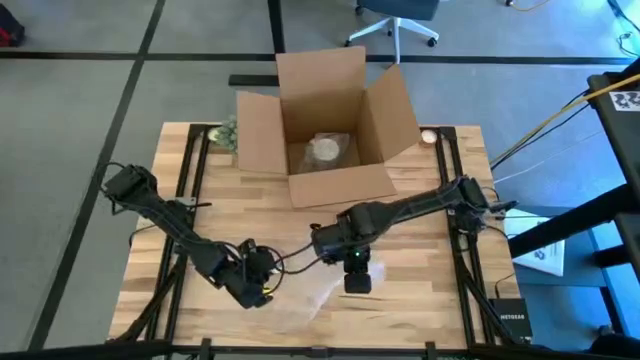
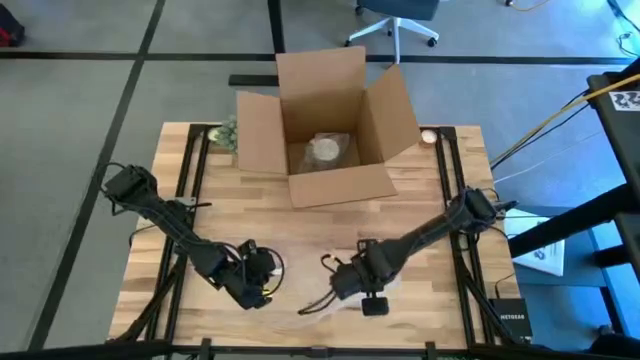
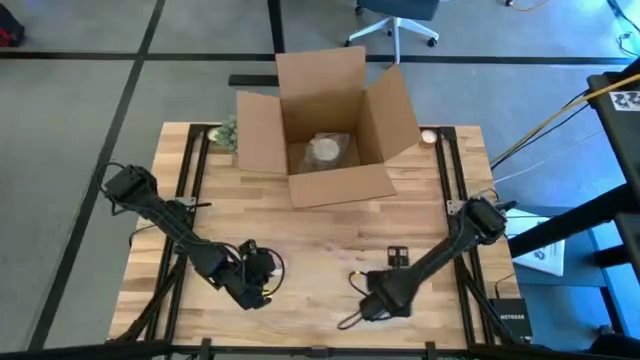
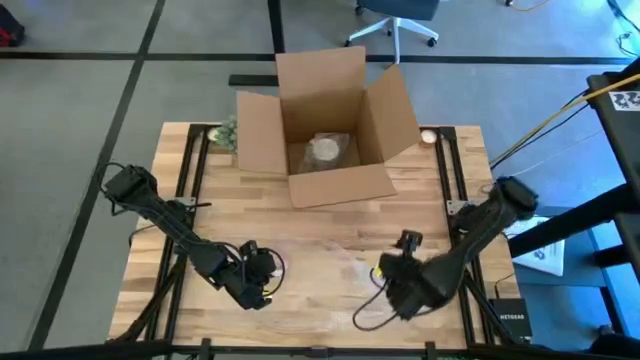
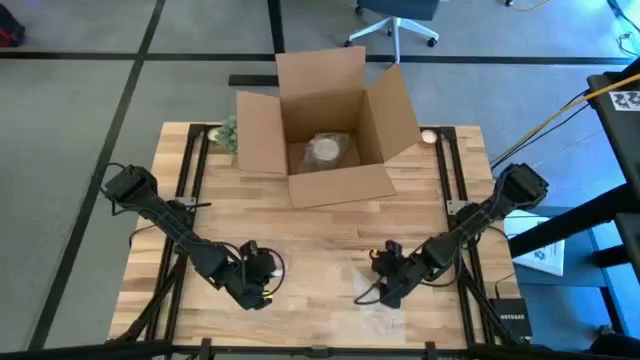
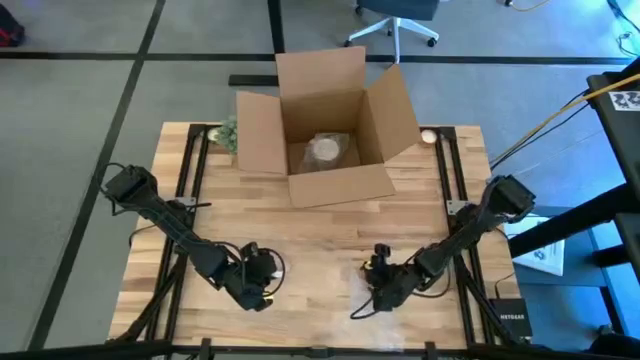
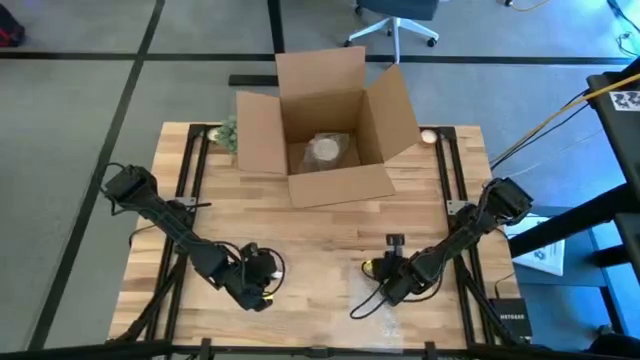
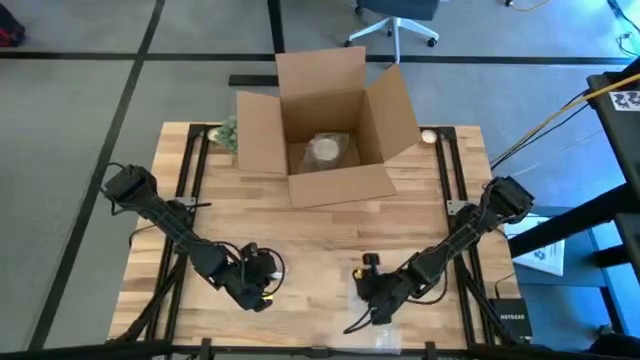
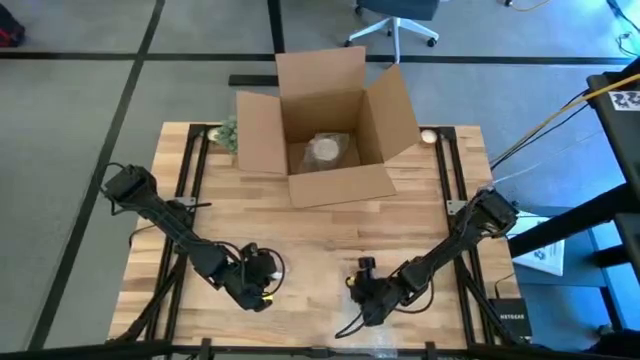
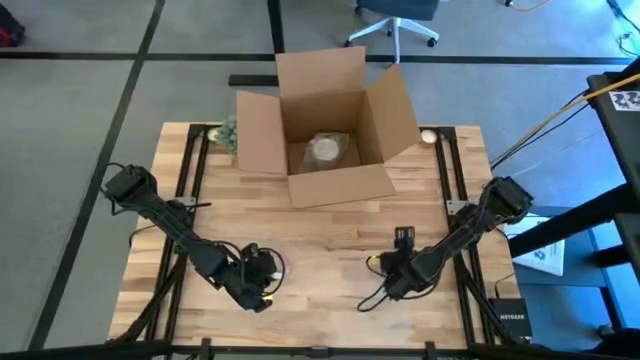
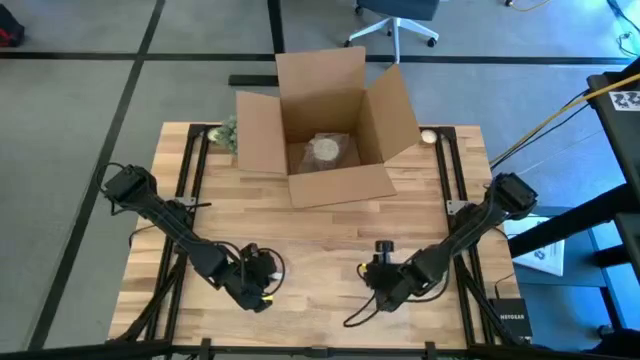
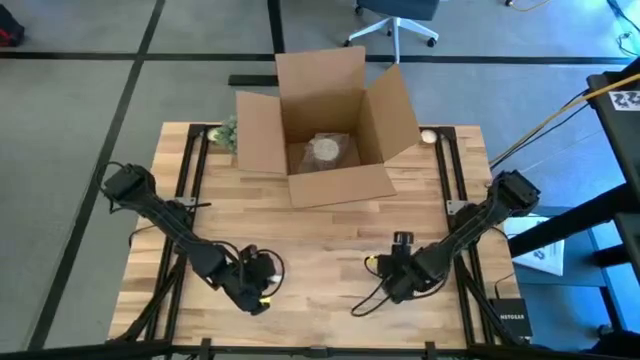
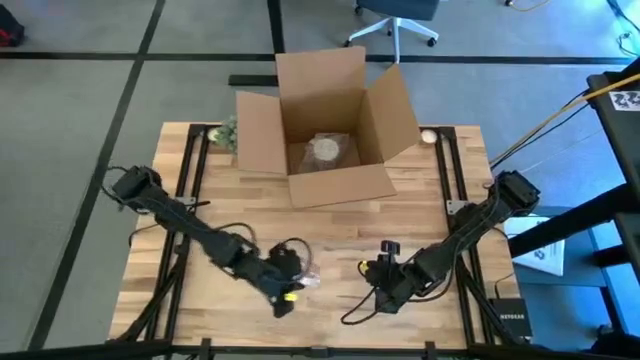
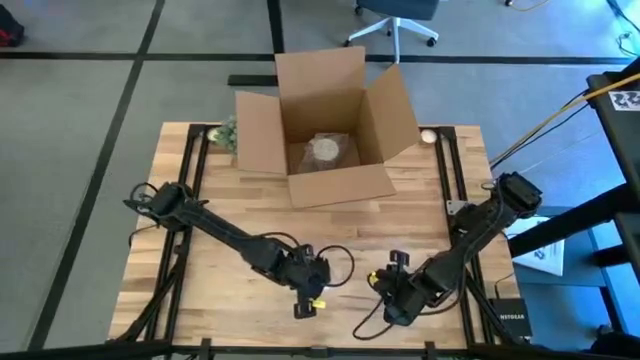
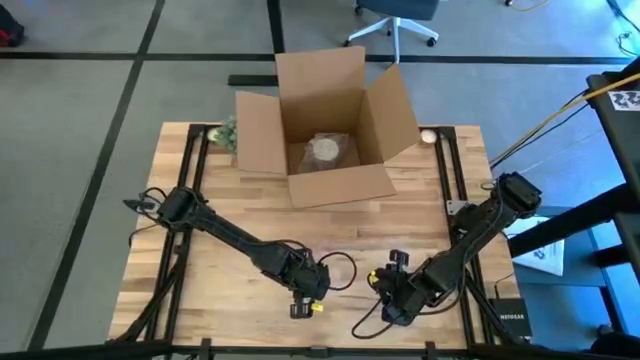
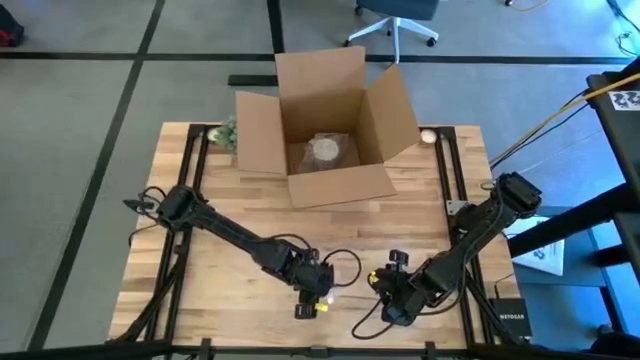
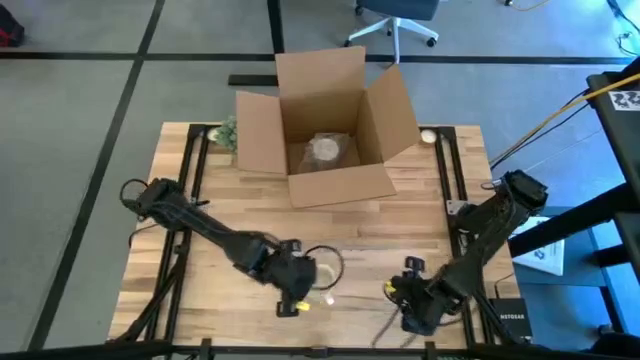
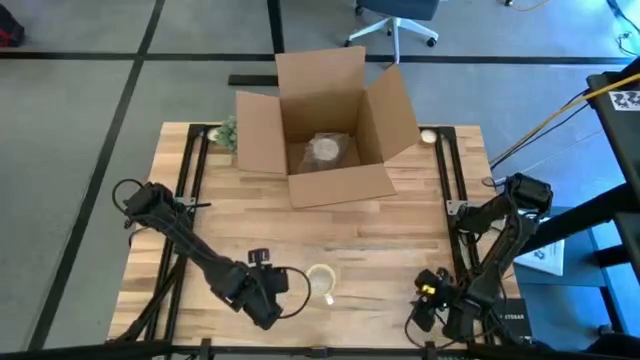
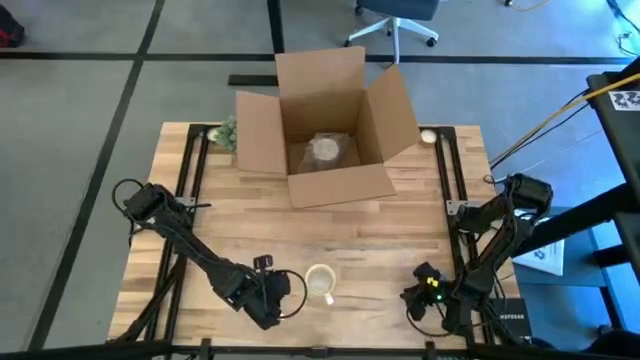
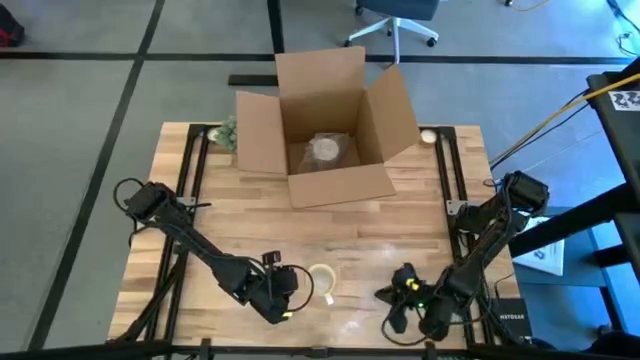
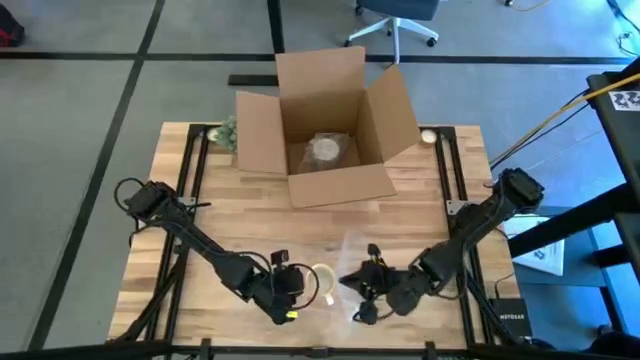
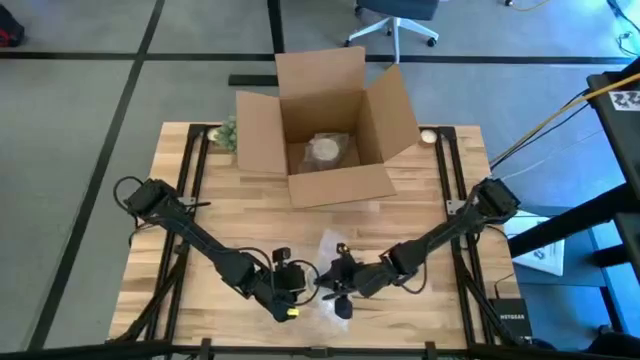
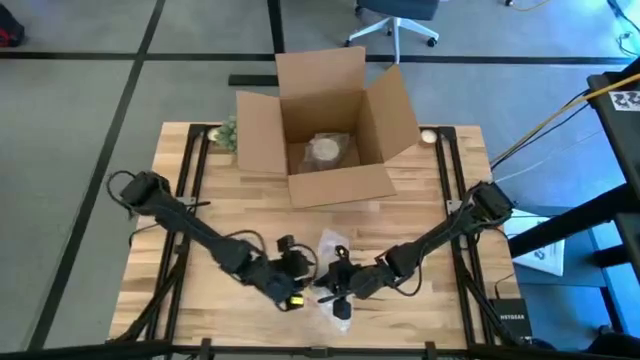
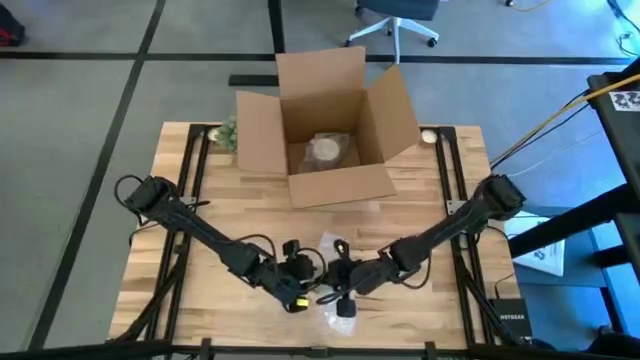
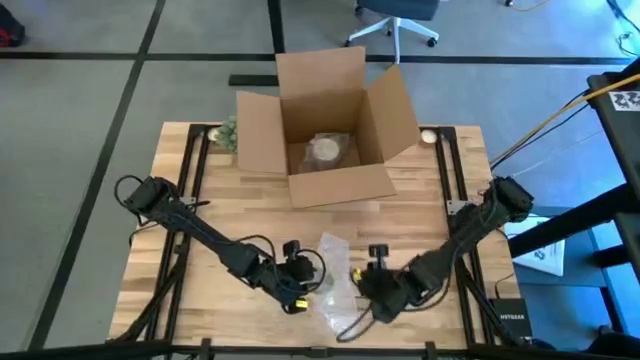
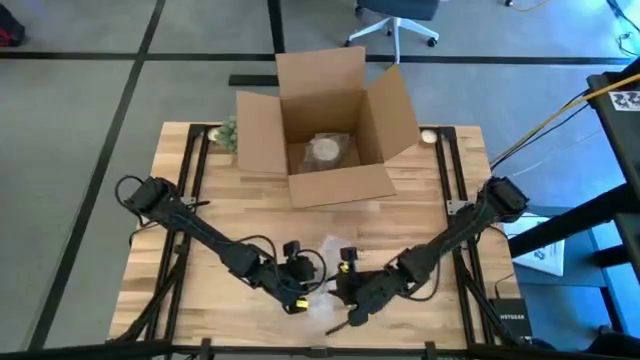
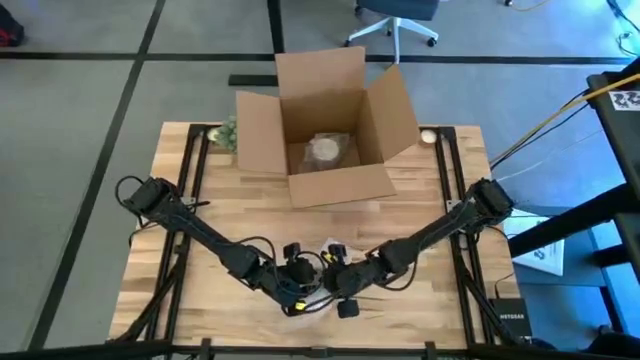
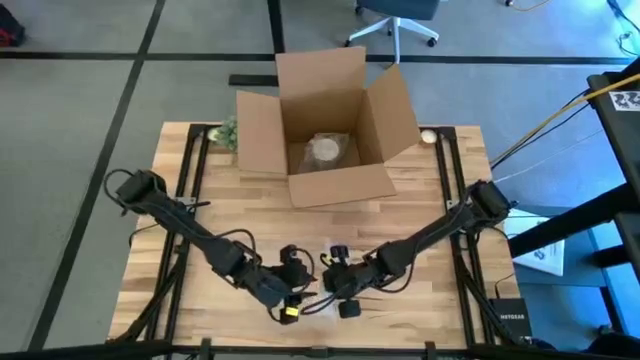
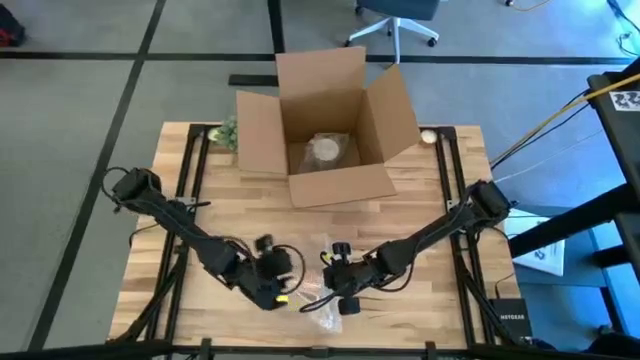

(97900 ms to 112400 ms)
Task: wrap mug
Wrap the orange mug with transparent bubble wrap

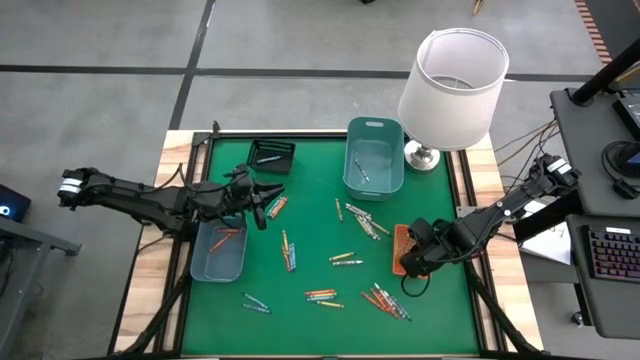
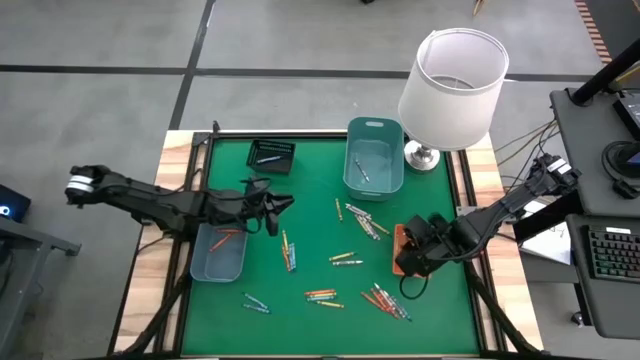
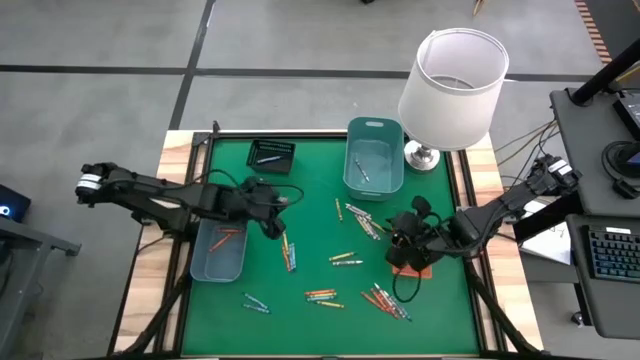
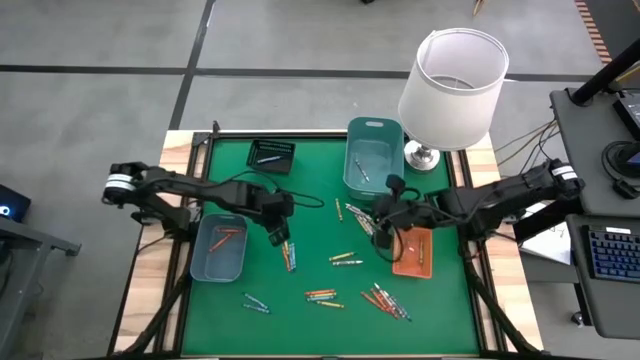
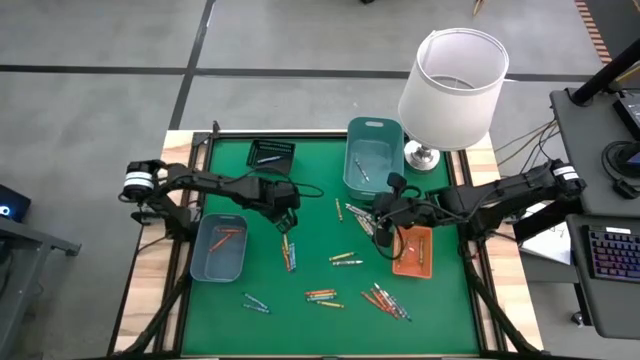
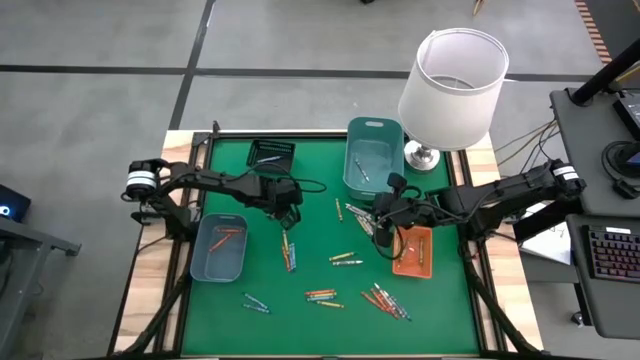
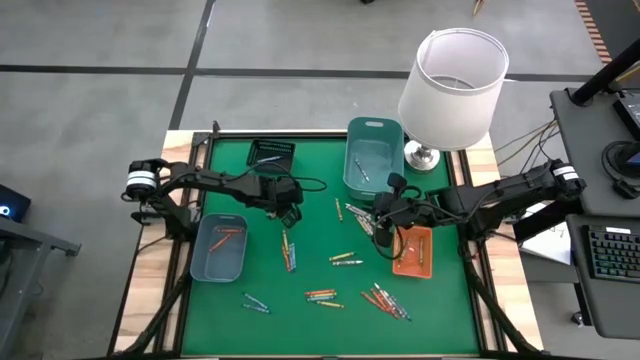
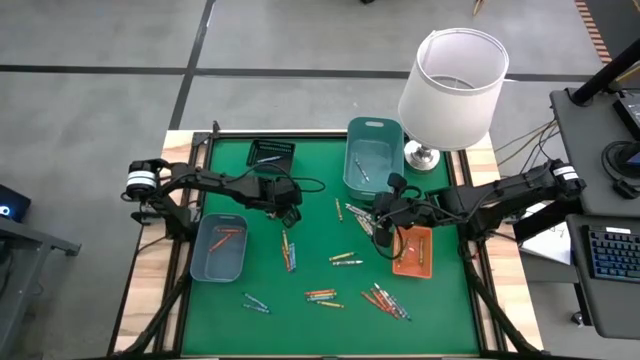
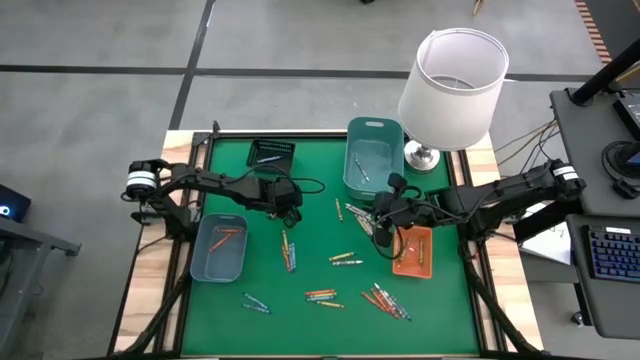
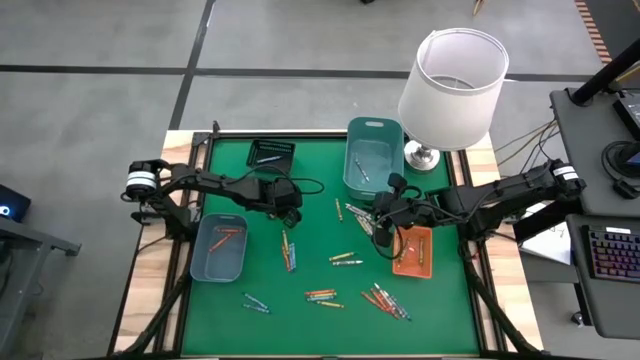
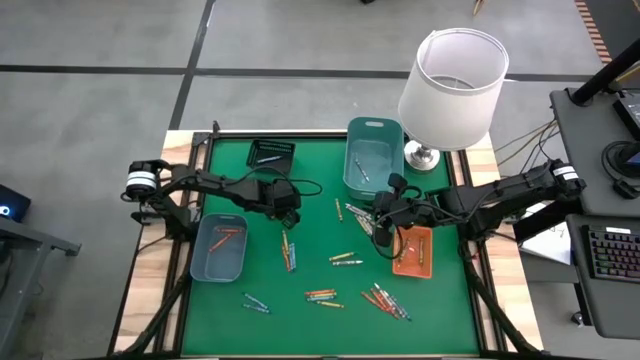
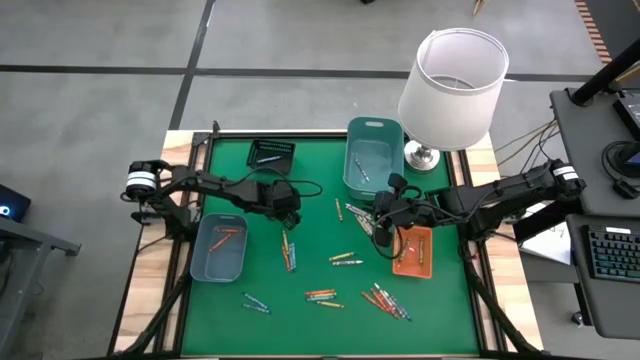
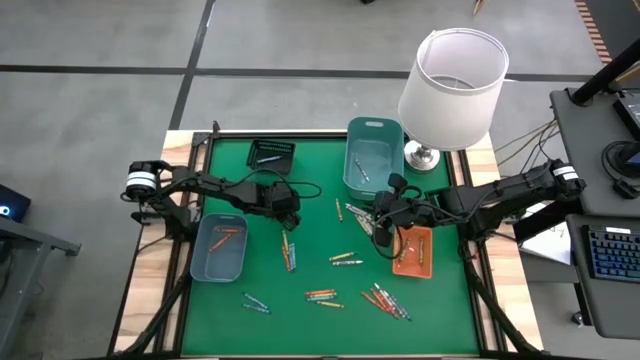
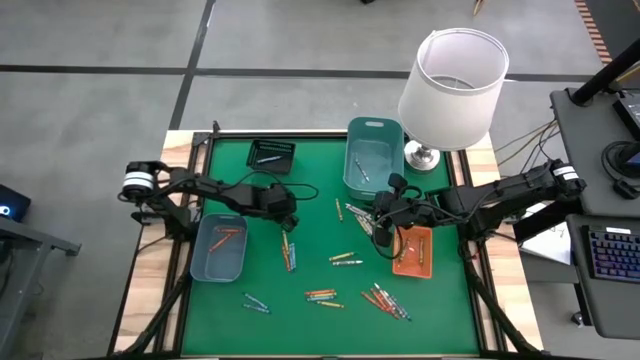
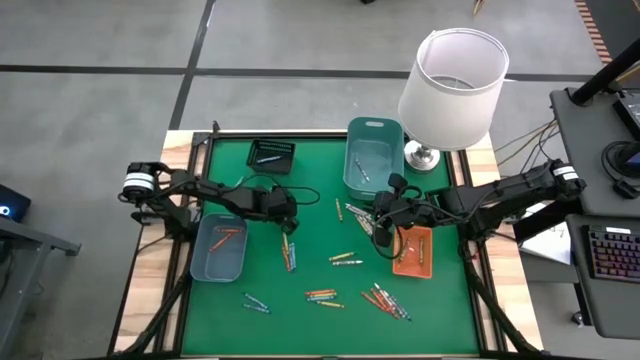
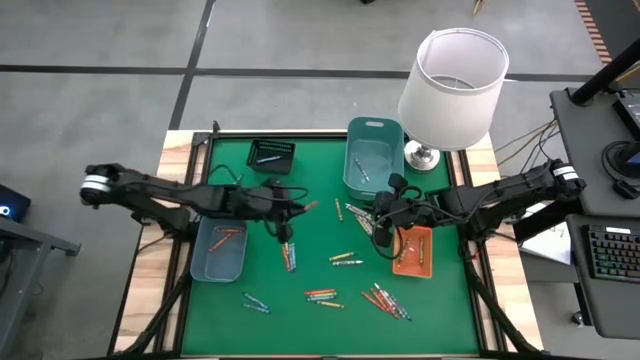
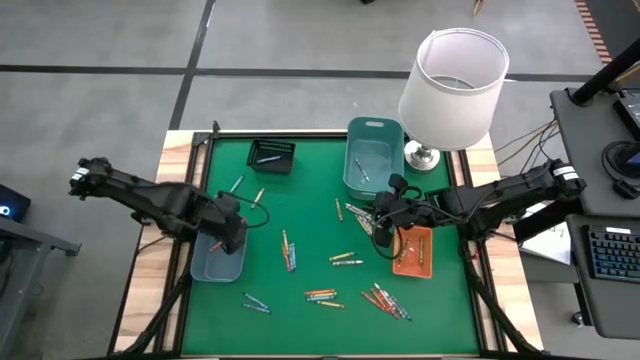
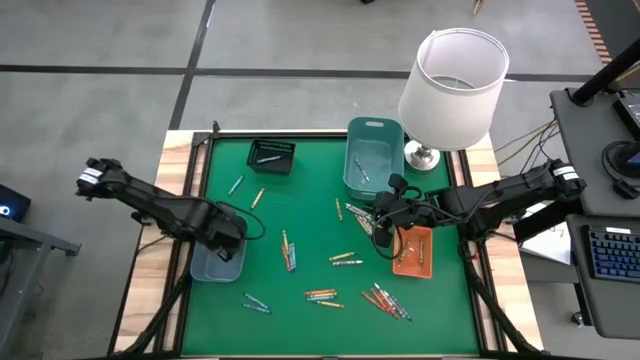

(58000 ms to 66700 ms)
Task: Sort crayons
Put the orange crayon into the blue bin
